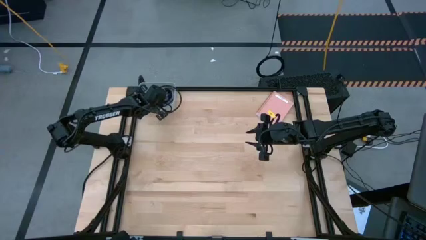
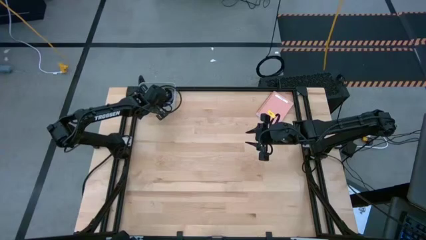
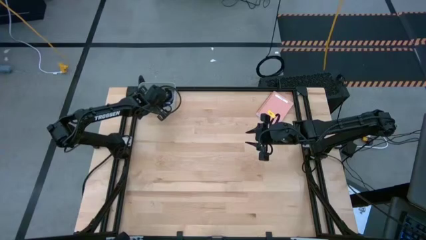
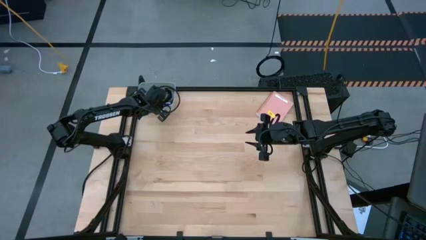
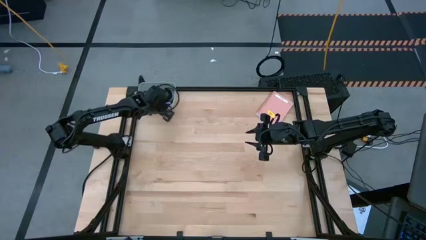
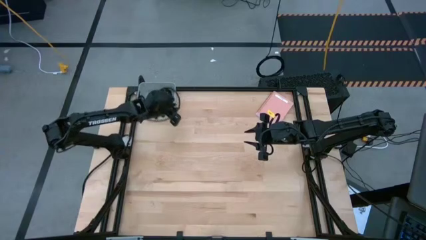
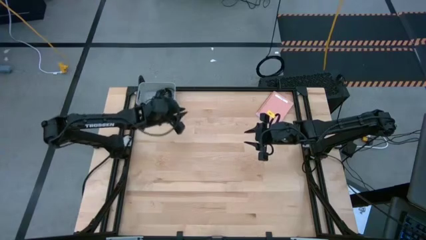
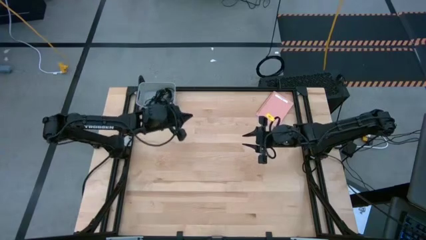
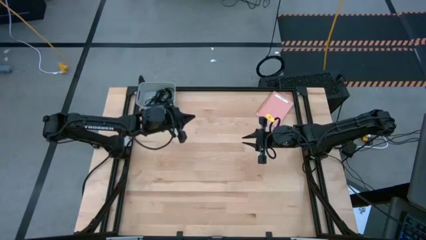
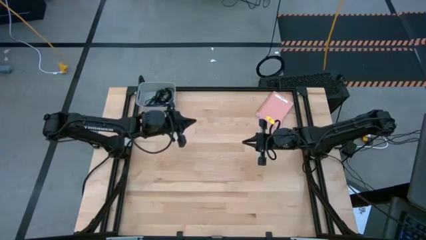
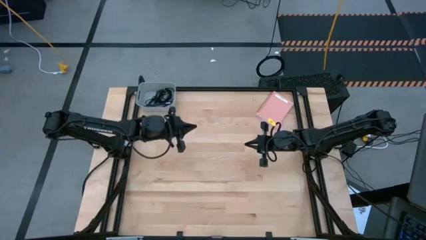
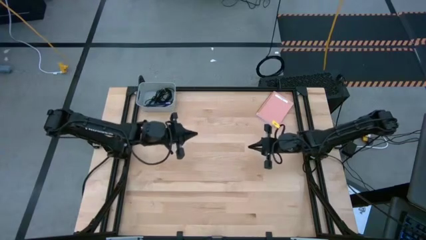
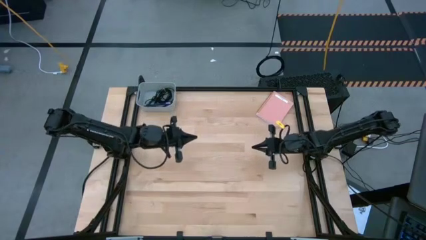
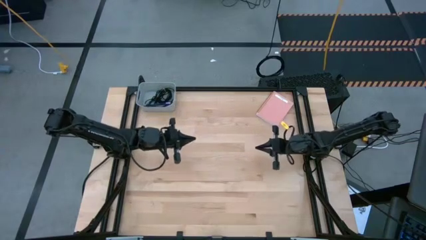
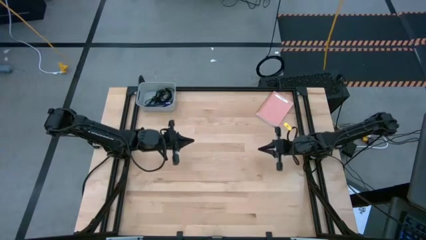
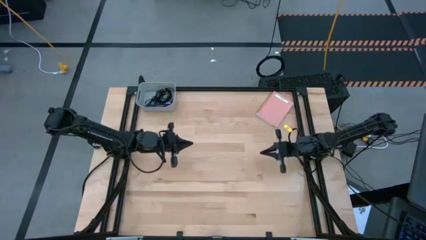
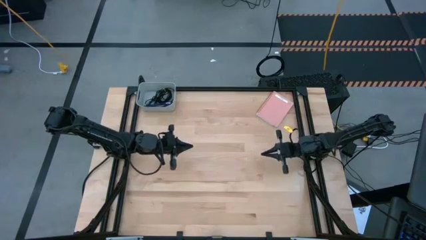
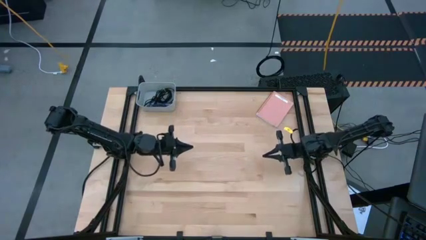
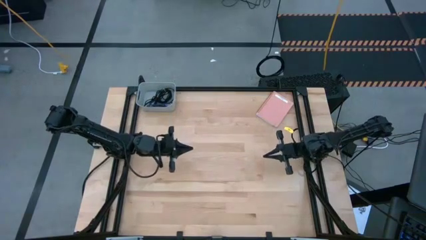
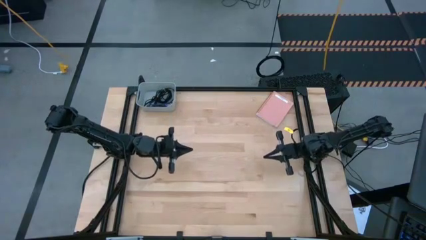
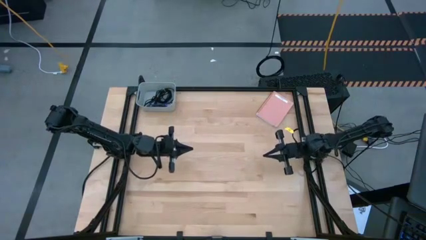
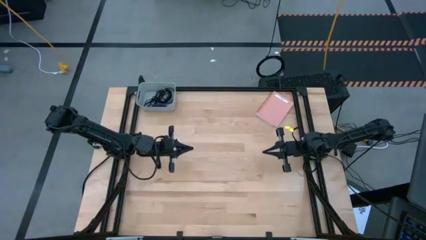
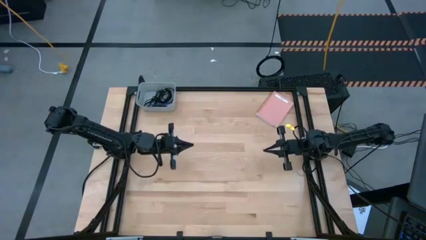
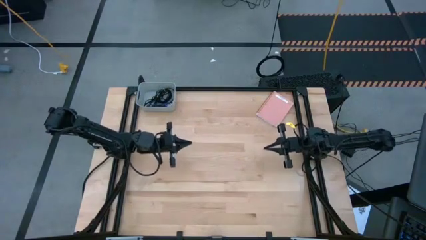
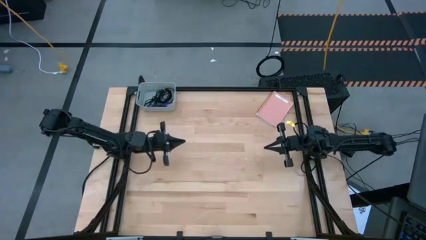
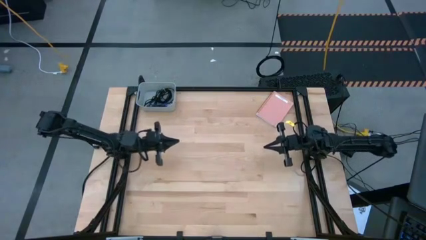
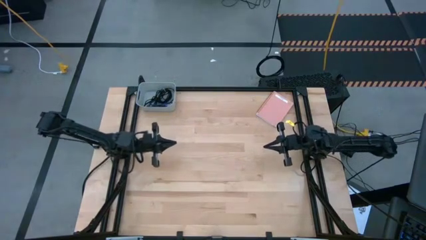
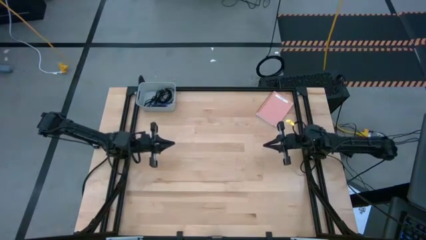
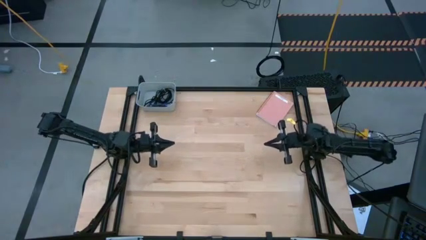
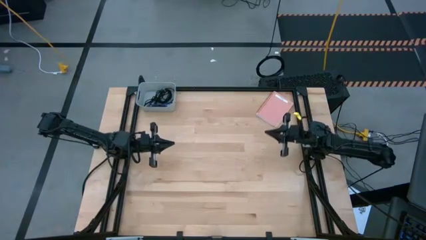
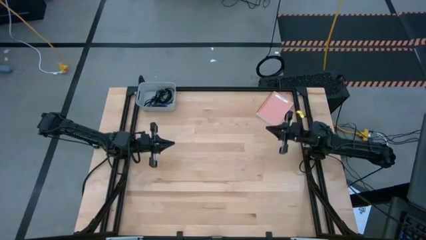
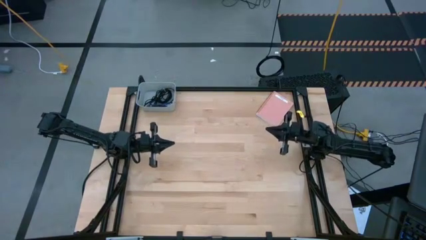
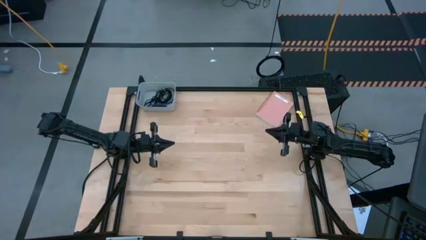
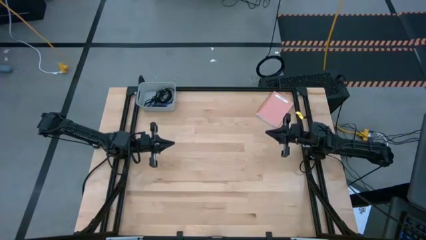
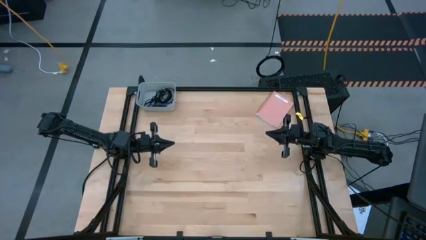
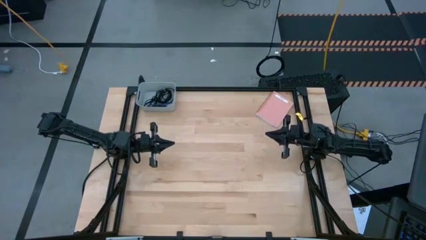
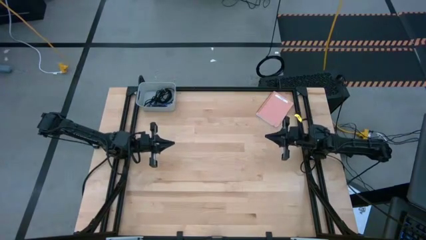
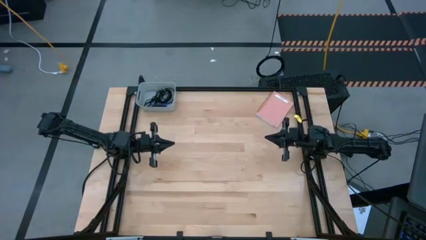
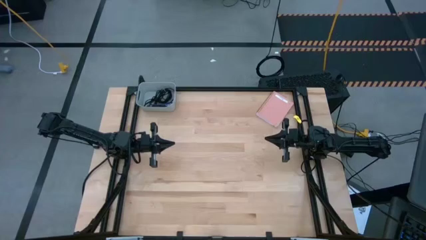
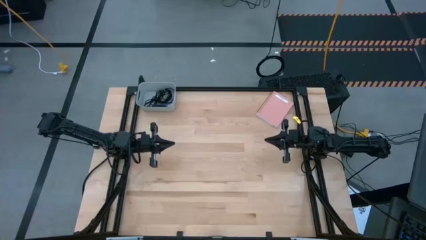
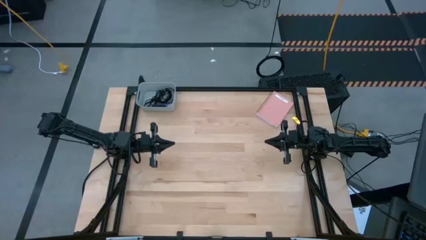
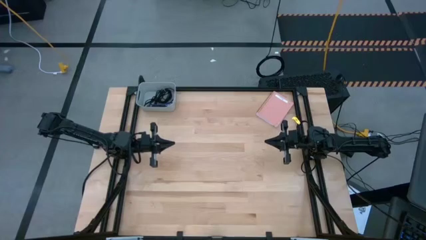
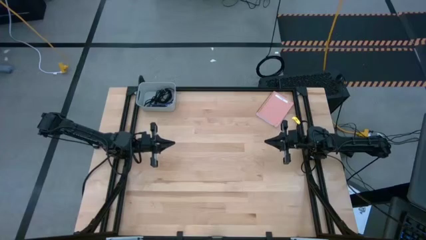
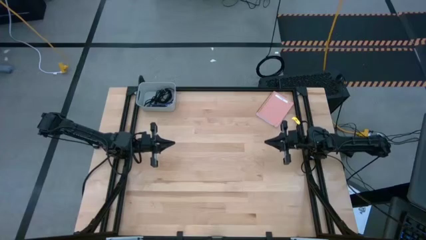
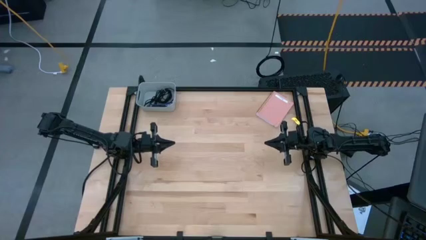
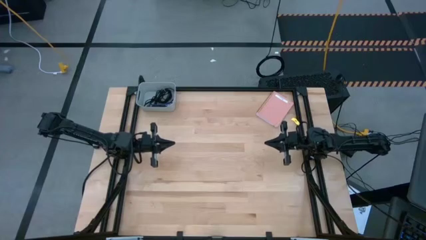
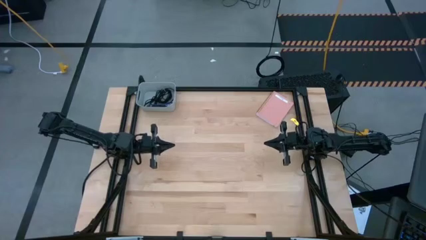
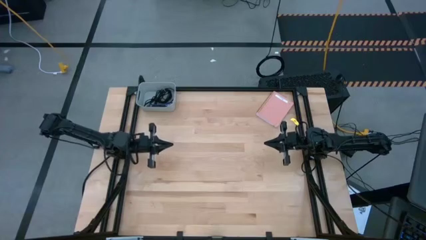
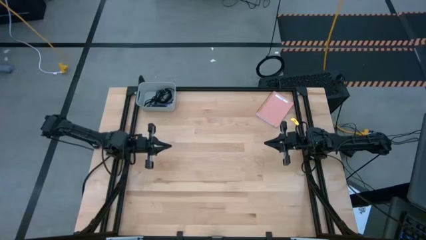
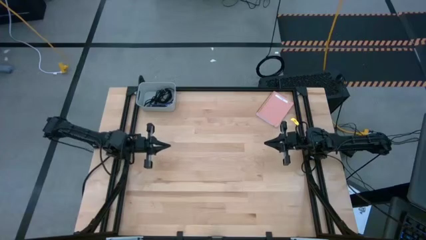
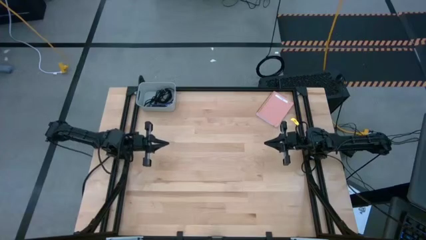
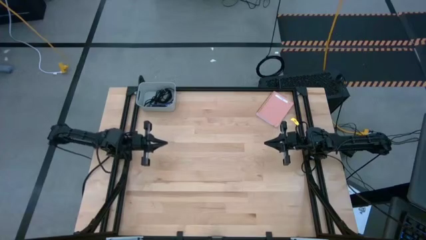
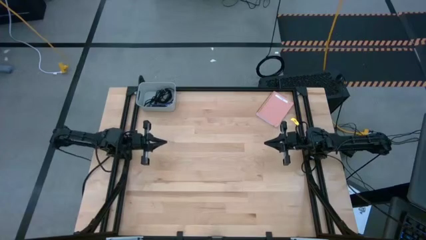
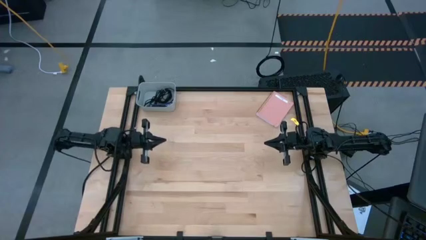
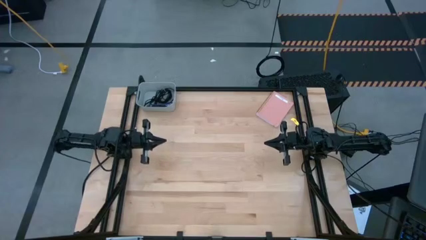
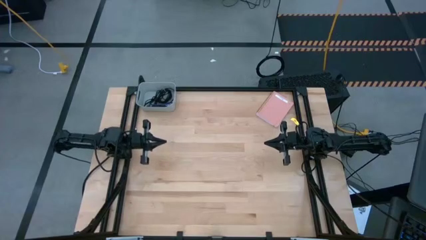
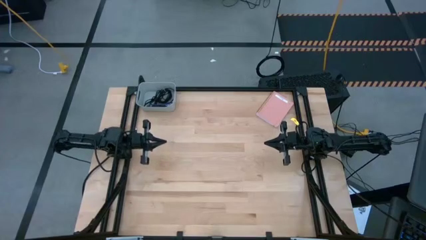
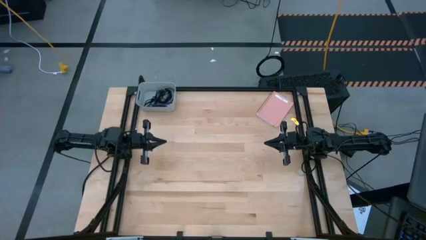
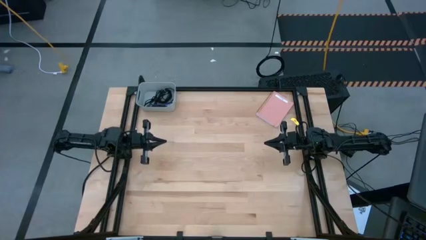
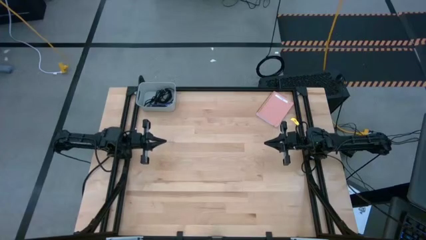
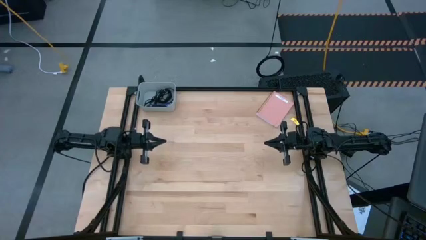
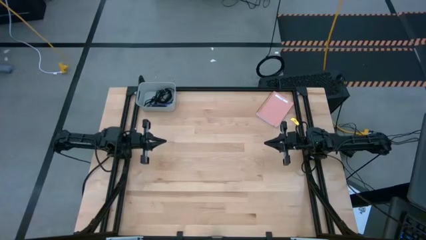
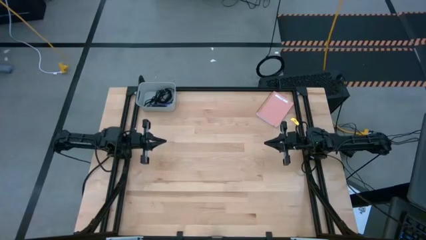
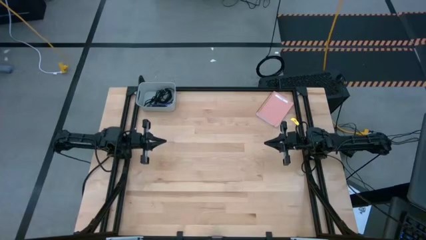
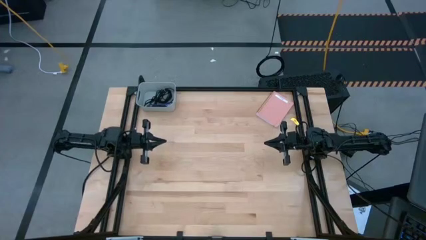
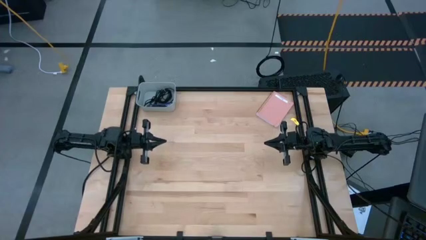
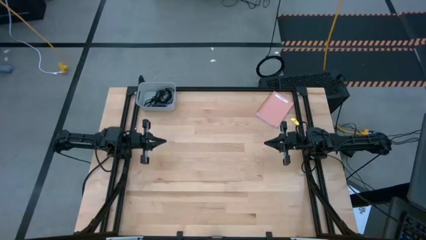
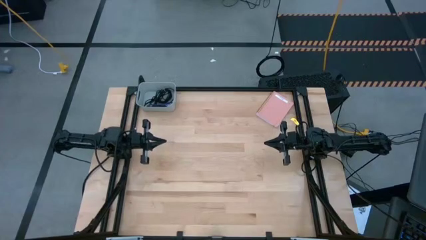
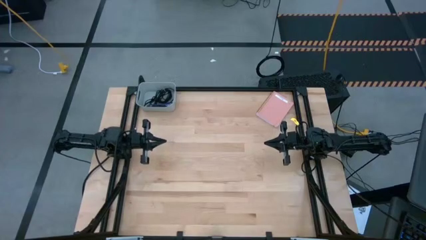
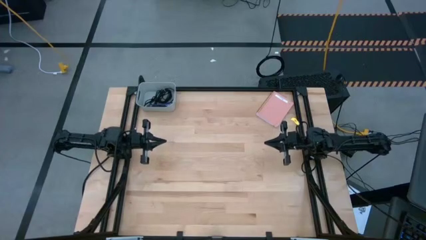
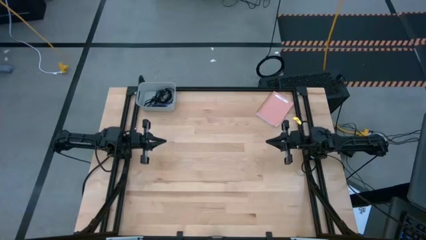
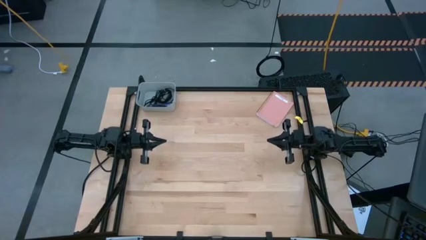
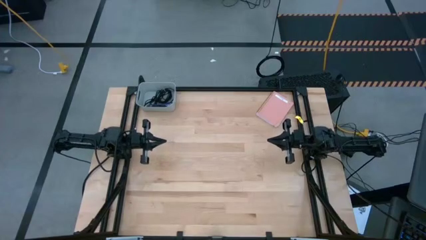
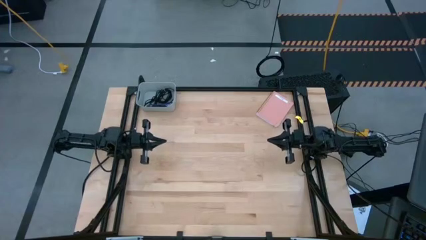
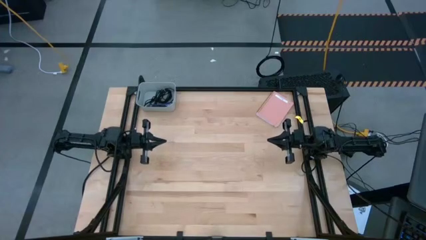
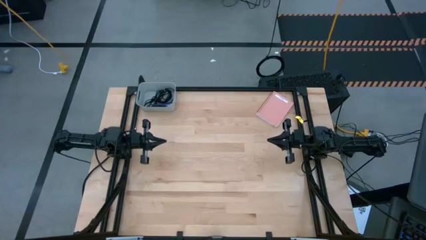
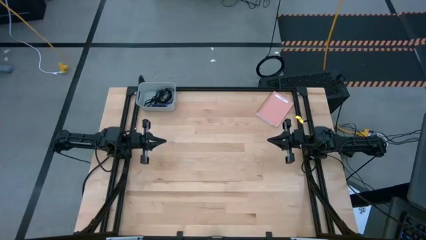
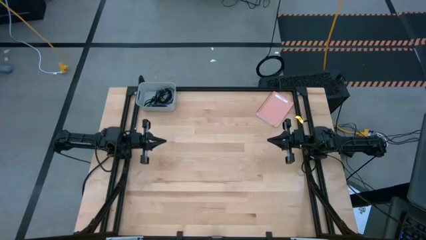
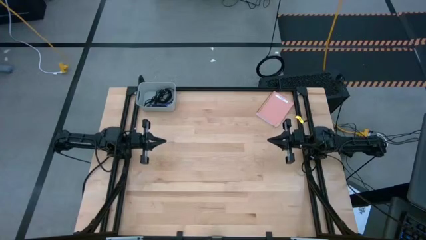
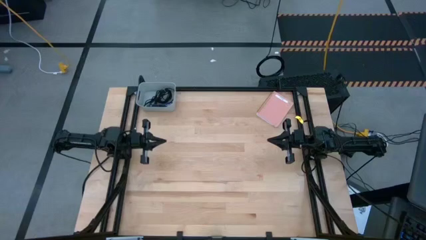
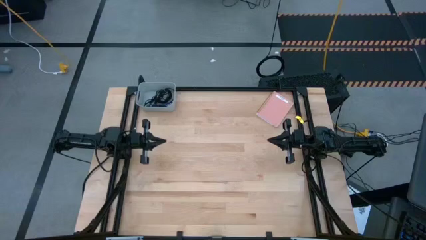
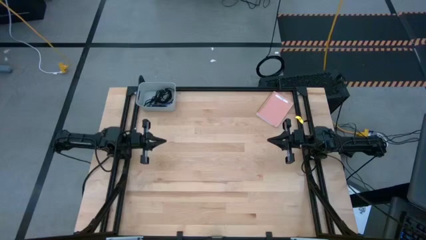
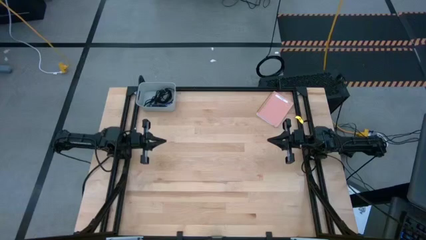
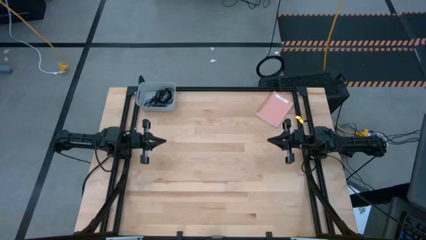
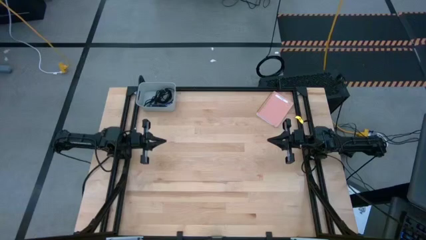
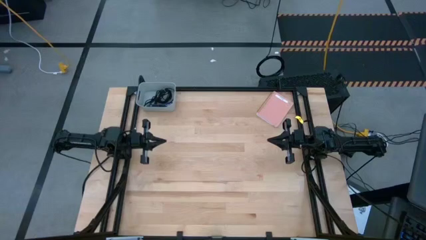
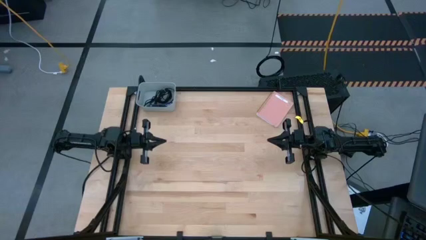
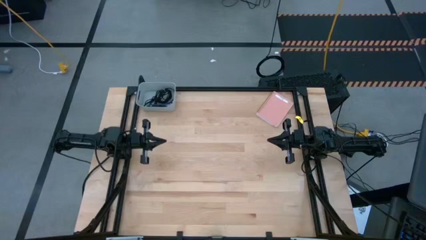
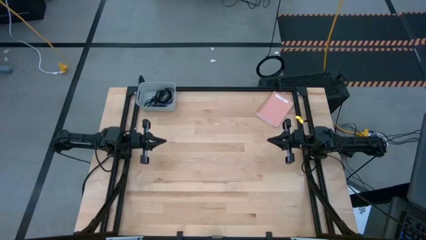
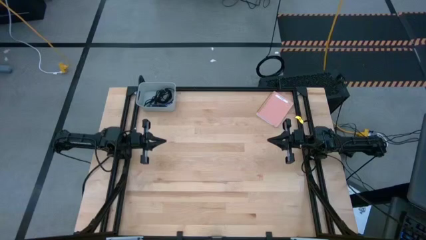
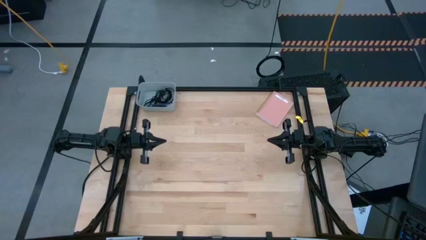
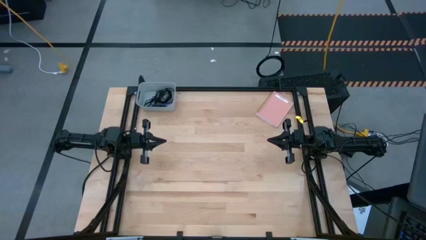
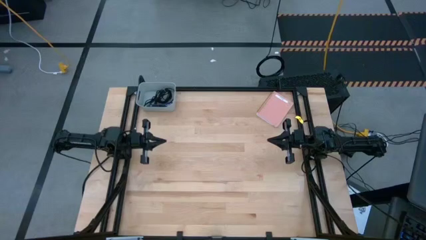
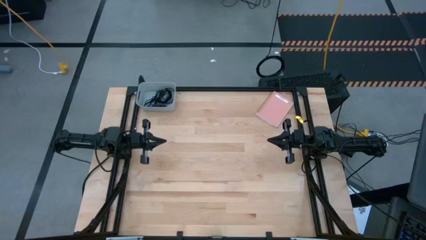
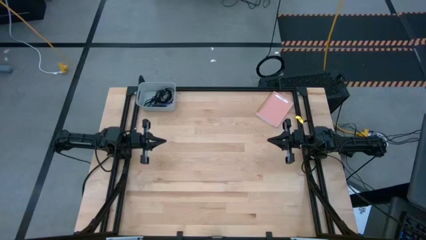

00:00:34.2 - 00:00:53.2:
Task: Pick and place USB-C Cables
Return to Home Position
